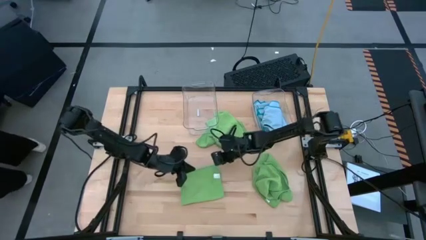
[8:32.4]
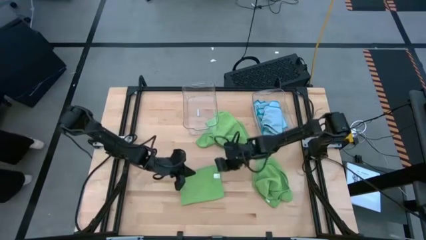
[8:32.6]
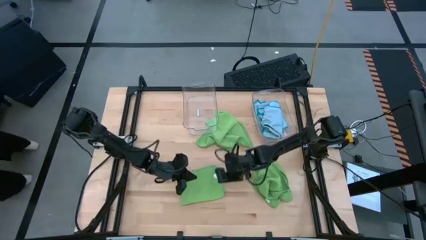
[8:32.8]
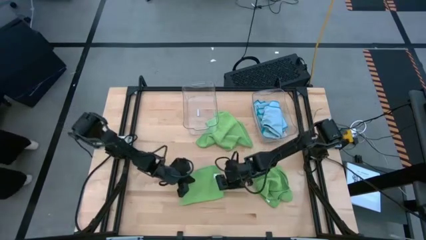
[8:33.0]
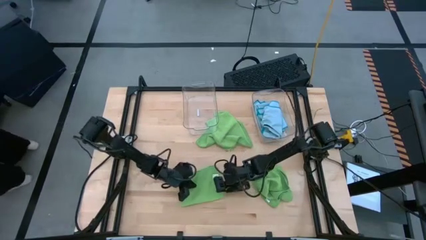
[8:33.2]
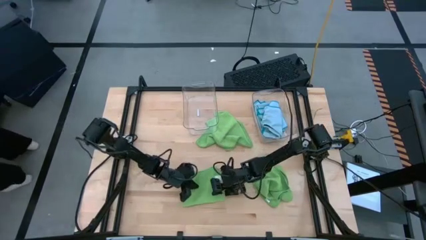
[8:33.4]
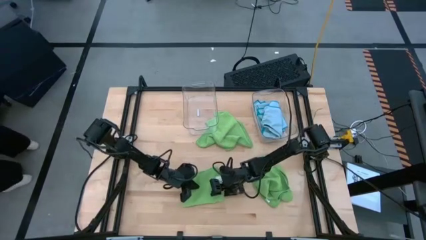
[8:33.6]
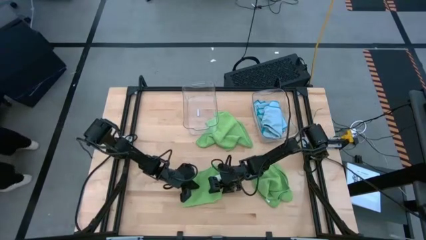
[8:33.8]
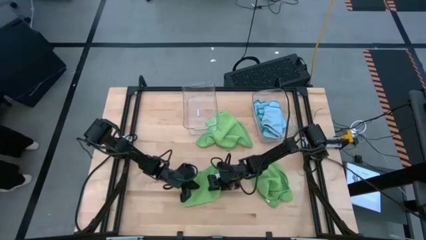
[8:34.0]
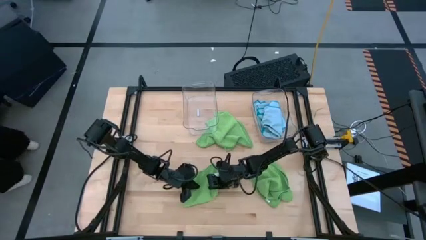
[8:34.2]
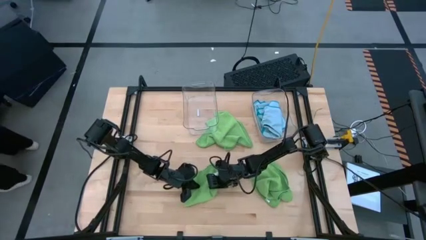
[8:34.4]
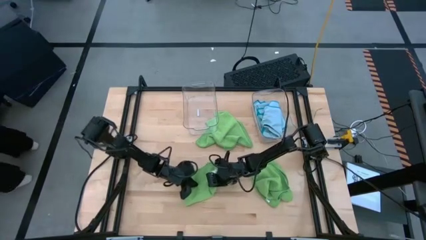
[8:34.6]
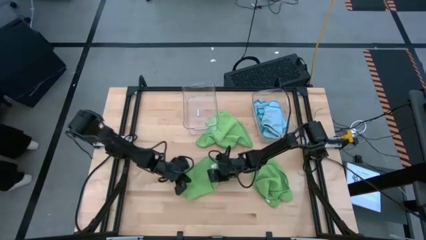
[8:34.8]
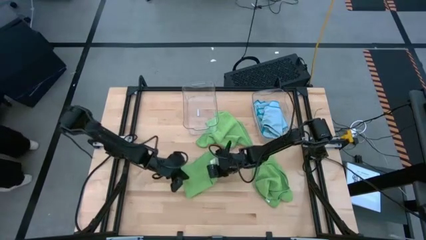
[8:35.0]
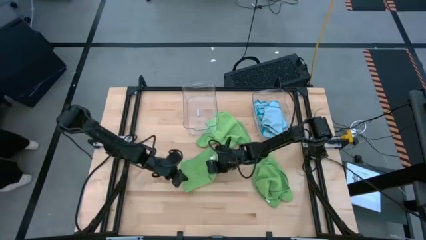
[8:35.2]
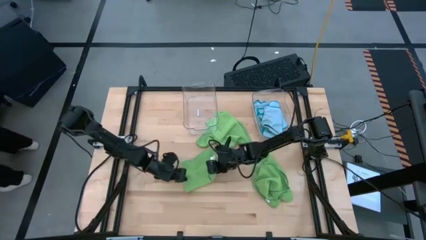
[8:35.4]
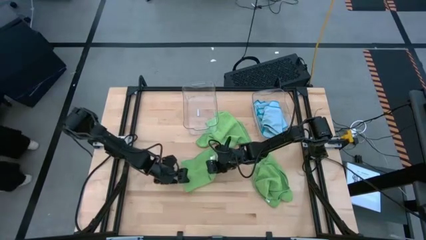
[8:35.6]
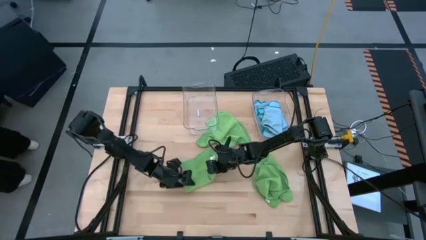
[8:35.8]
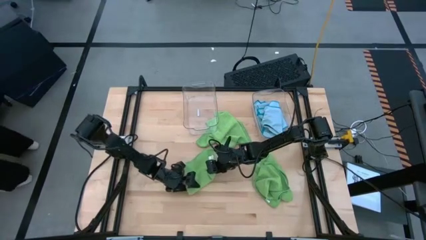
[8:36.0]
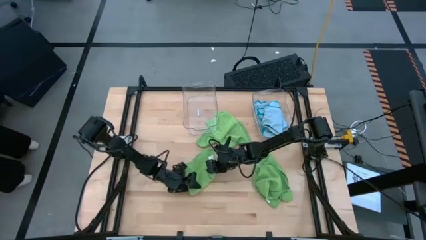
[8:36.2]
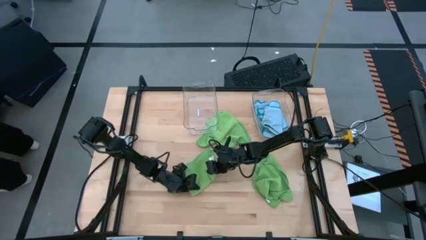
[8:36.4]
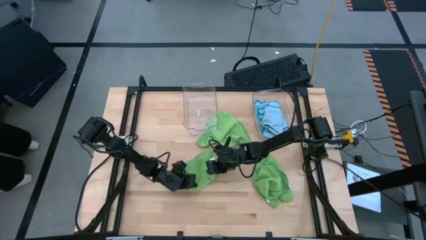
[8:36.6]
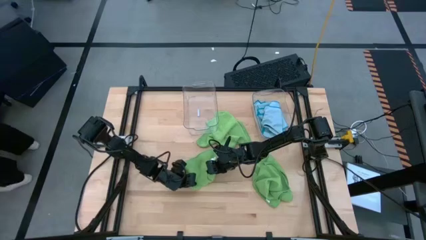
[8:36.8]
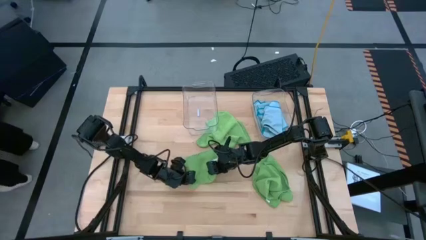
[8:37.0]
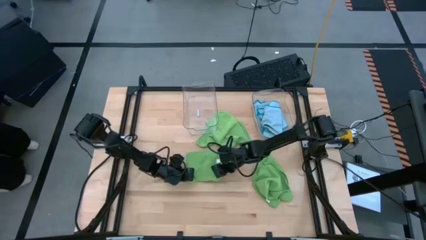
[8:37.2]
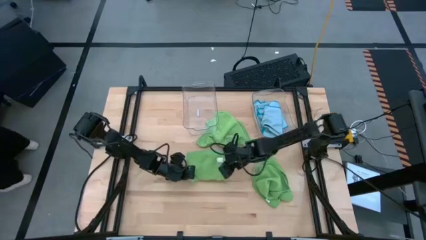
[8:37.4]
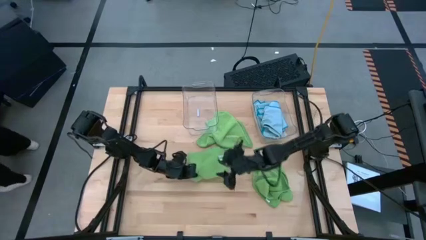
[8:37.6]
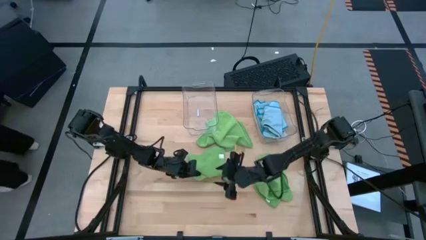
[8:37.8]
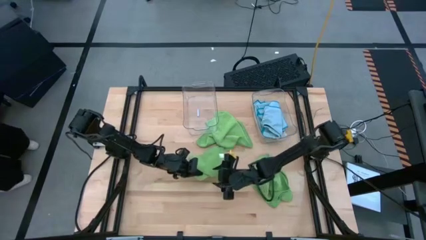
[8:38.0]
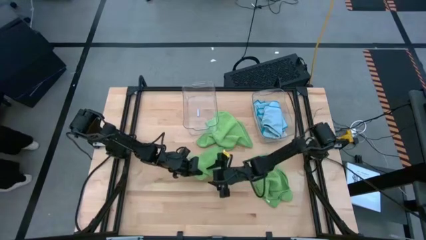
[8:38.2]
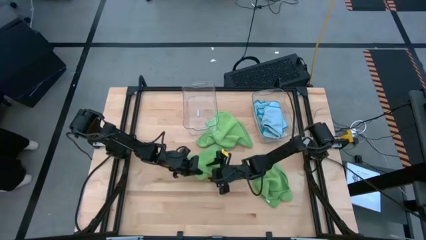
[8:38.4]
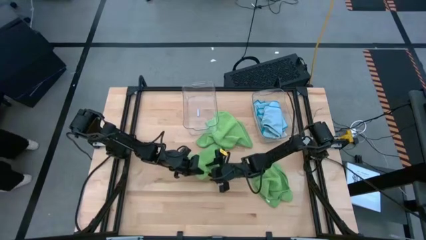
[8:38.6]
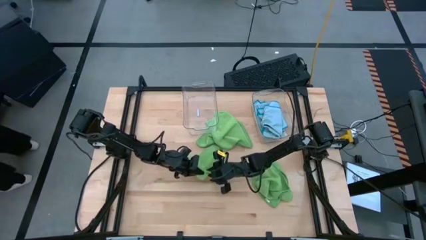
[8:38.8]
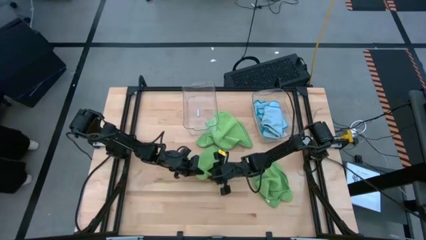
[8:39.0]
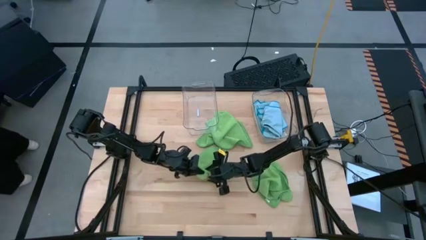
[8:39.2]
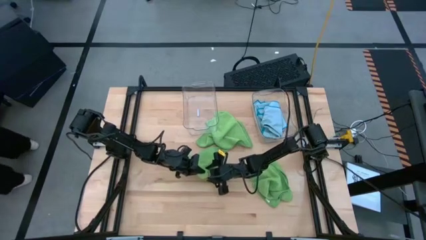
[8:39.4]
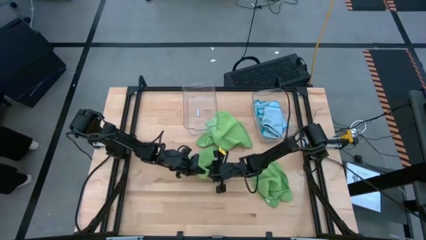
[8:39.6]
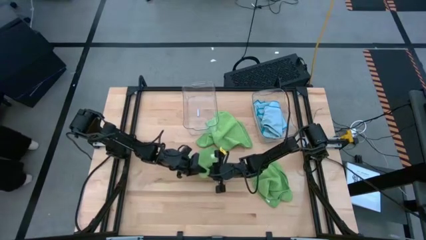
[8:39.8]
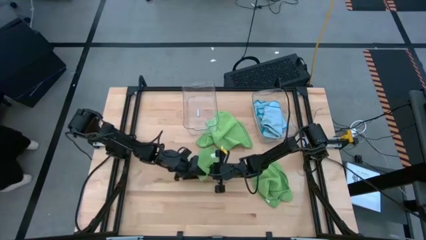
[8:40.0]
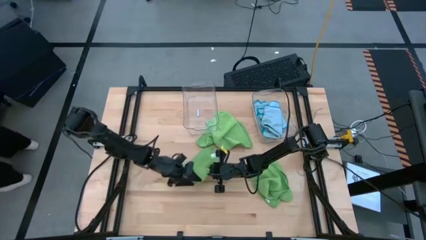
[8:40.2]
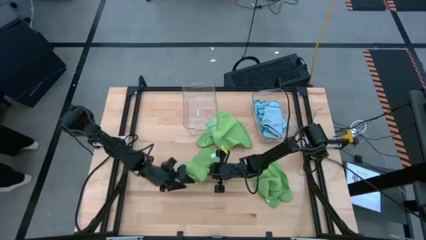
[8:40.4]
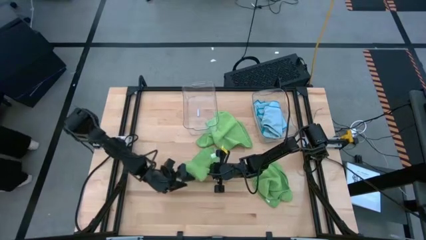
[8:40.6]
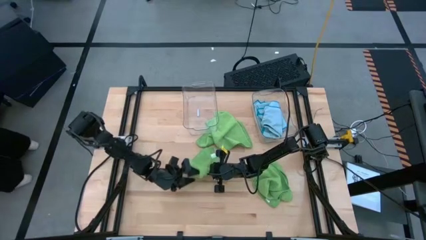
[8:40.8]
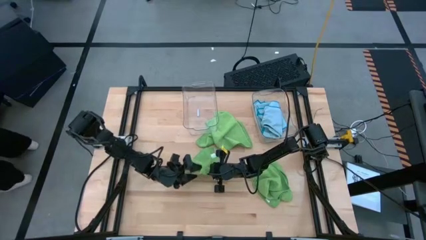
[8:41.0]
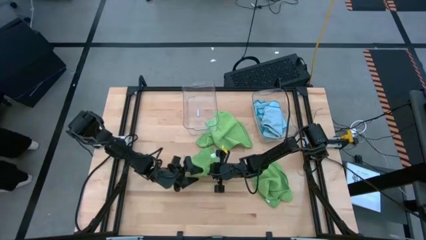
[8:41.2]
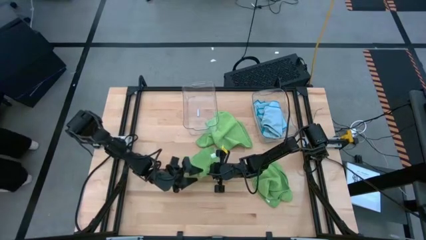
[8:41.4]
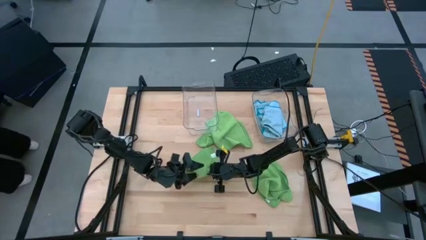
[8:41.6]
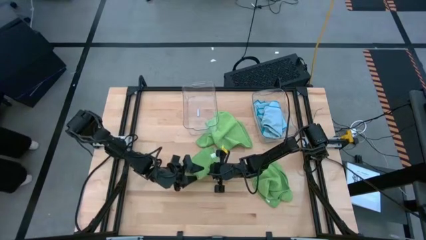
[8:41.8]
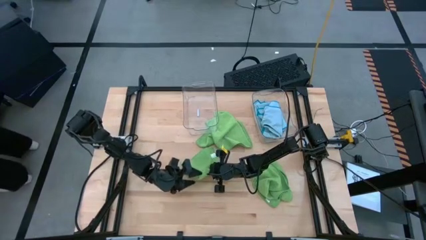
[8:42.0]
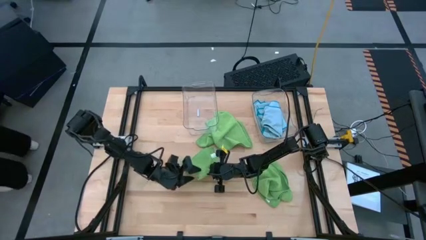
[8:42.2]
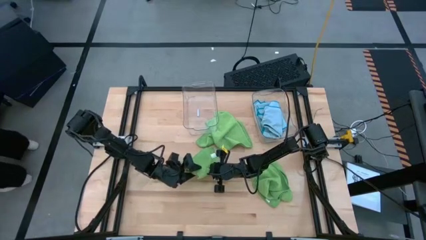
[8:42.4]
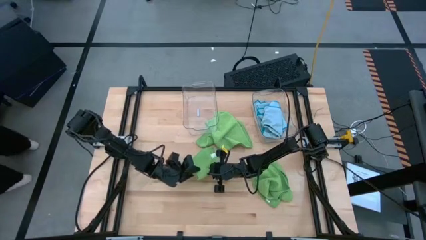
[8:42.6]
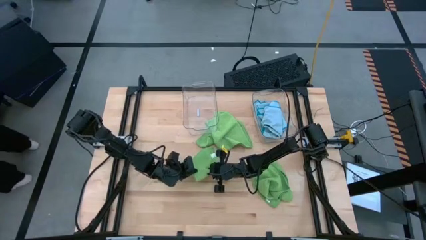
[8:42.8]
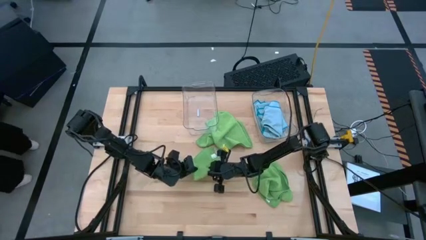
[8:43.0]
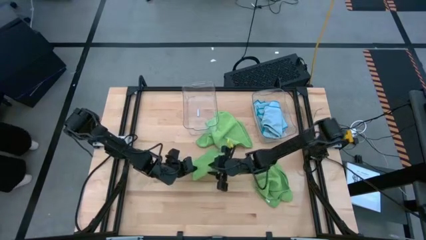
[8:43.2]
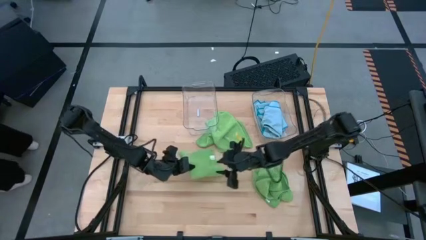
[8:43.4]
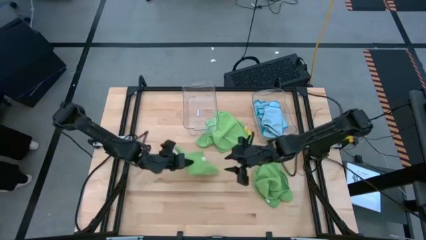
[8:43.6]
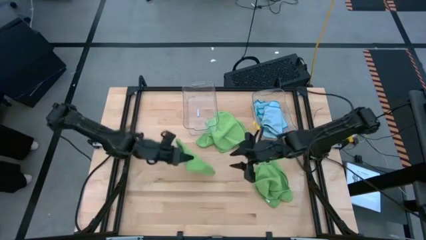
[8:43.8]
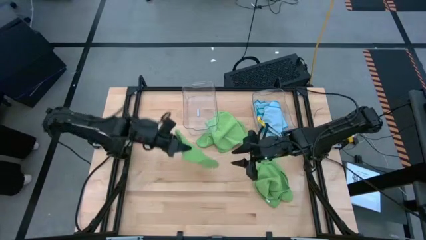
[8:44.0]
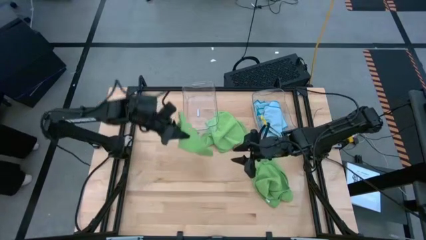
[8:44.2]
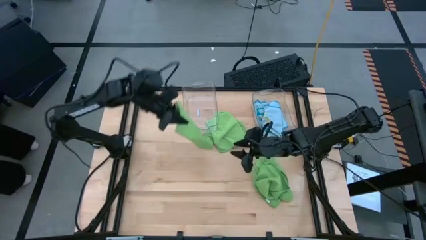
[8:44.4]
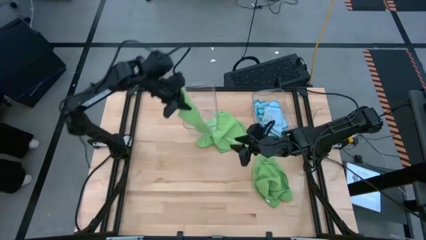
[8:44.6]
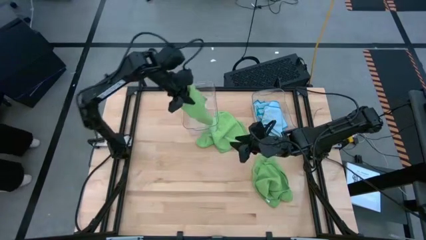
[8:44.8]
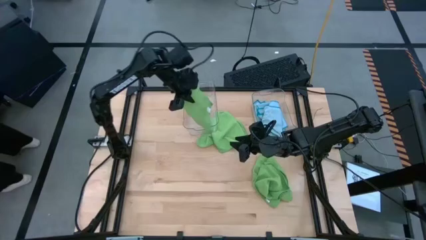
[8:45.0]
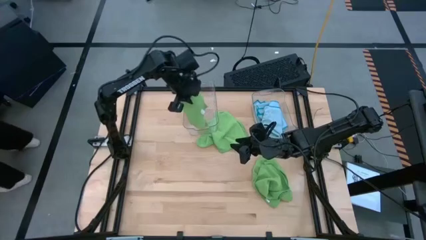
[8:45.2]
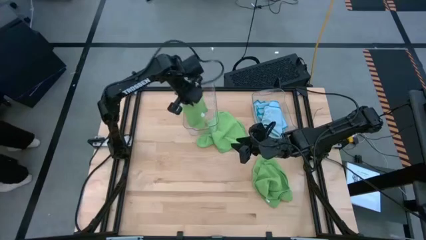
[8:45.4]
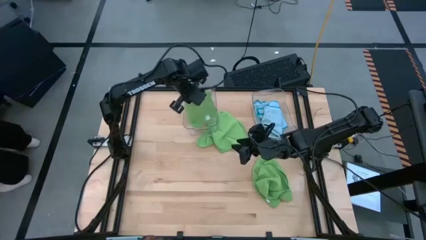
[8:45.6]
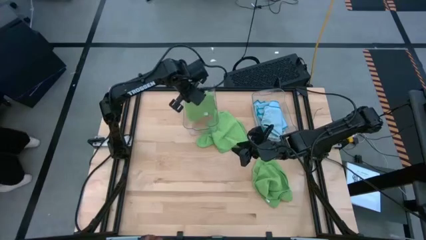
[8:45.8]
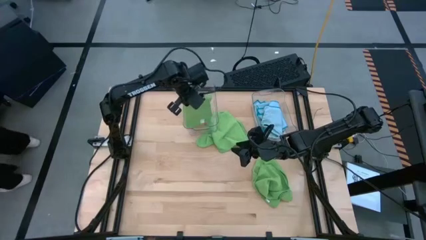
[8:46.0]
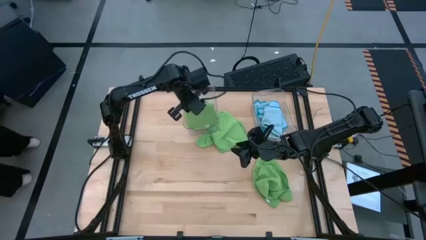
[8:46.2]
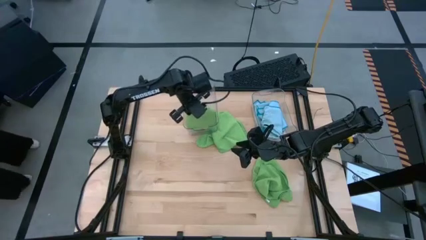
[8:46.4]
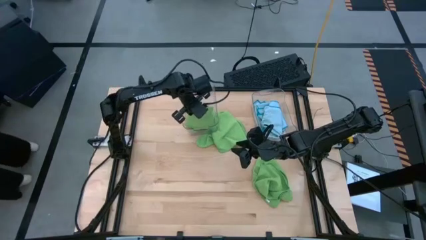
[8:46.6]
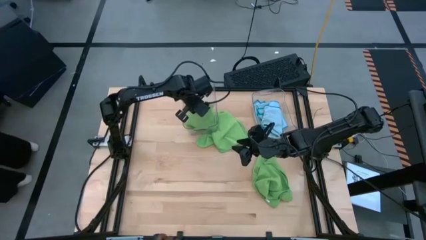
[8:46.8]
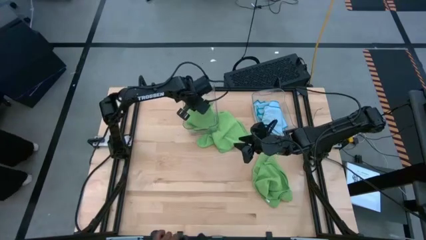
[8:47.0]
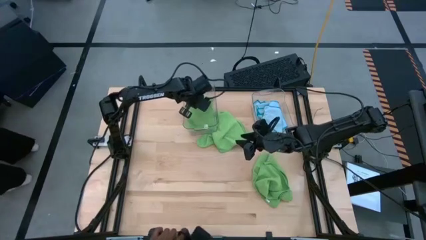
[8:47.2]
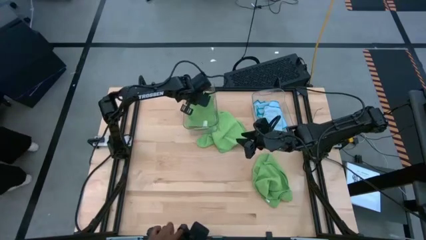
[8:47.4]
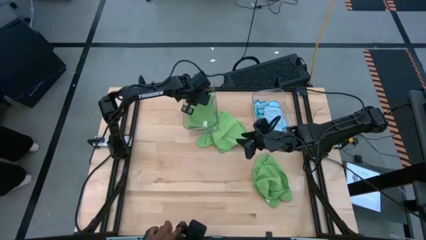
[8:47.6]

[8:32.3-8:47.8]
Task: Fold microfiber towels
Put the bottom left green microfiber towel into the left transparent bin
